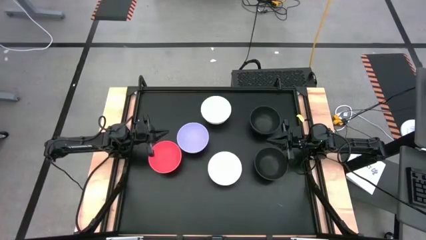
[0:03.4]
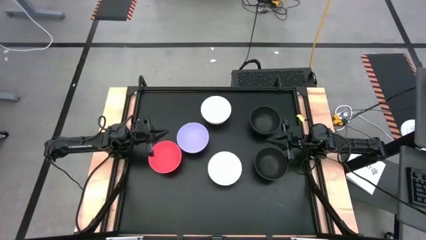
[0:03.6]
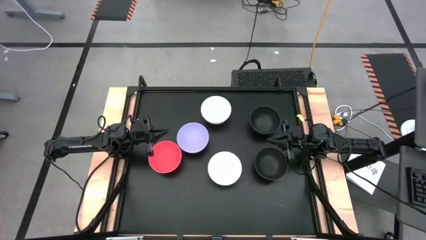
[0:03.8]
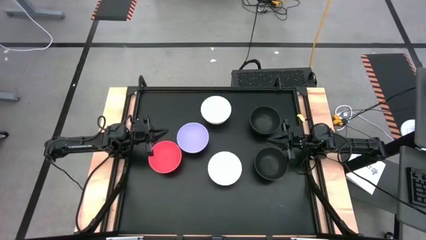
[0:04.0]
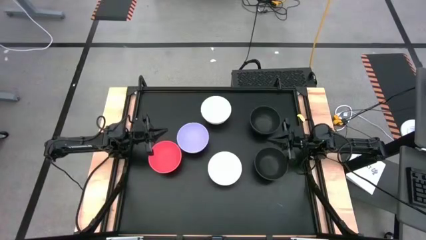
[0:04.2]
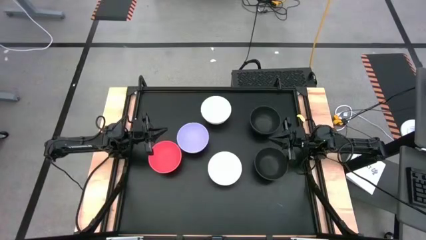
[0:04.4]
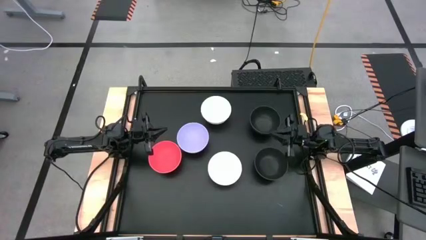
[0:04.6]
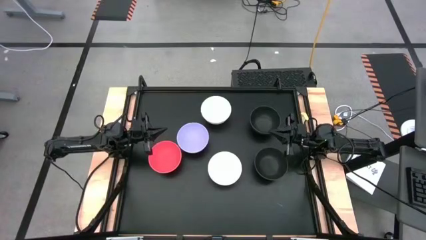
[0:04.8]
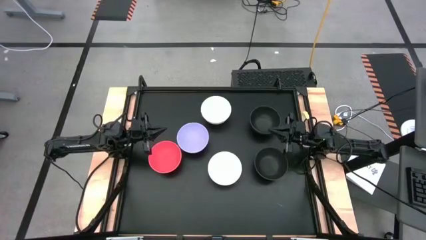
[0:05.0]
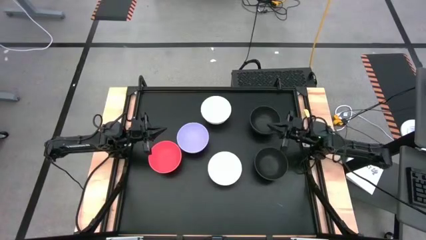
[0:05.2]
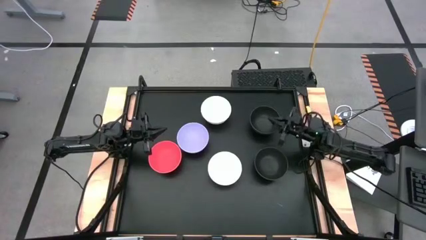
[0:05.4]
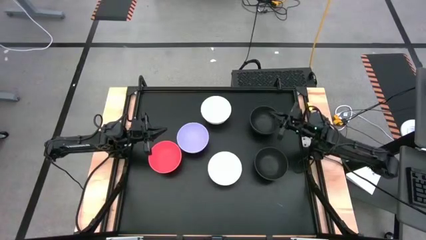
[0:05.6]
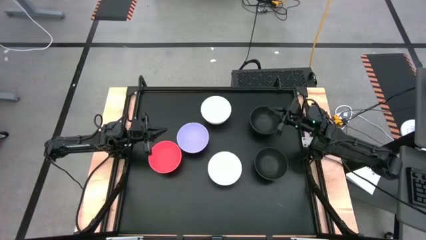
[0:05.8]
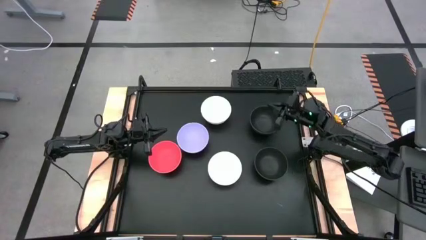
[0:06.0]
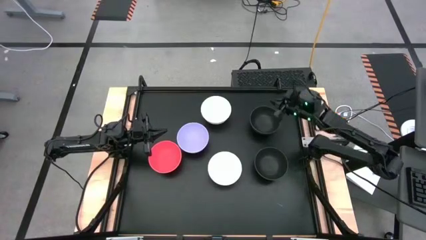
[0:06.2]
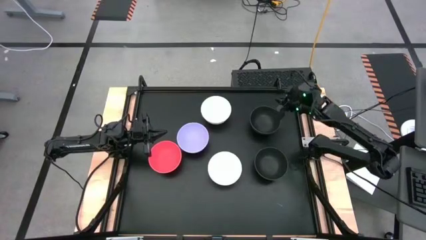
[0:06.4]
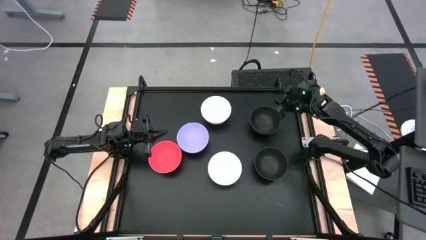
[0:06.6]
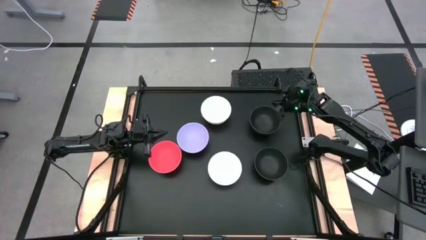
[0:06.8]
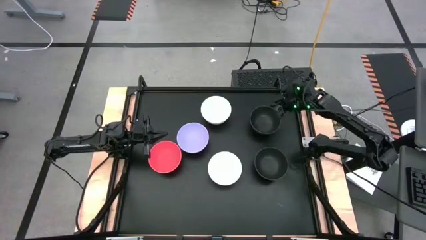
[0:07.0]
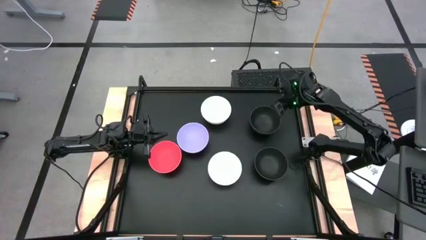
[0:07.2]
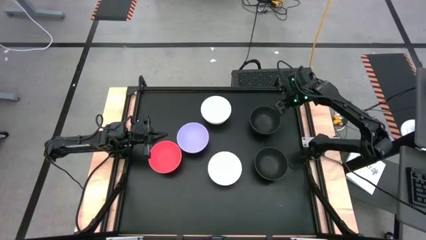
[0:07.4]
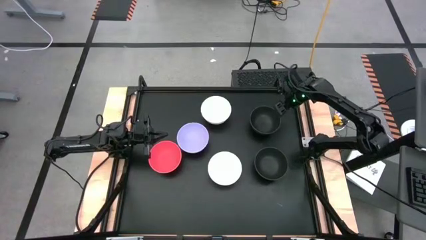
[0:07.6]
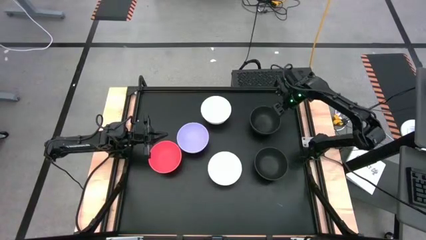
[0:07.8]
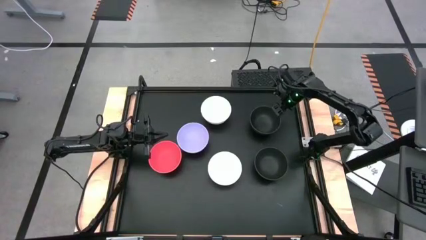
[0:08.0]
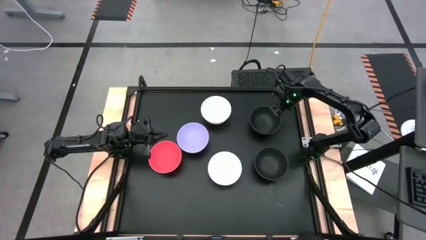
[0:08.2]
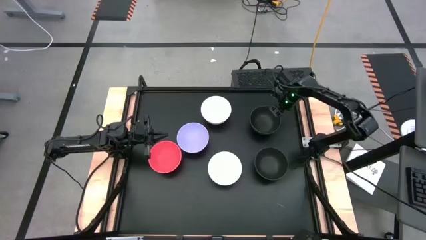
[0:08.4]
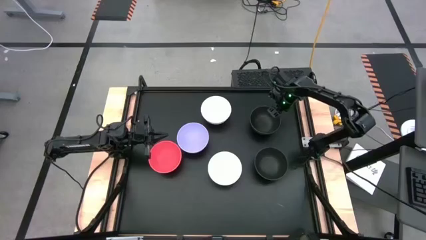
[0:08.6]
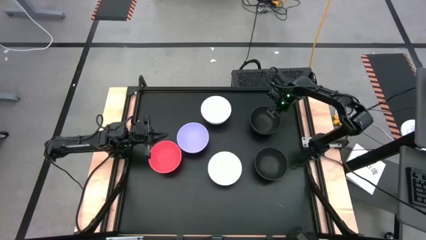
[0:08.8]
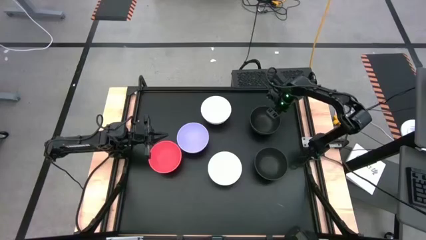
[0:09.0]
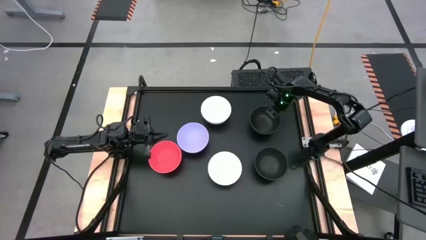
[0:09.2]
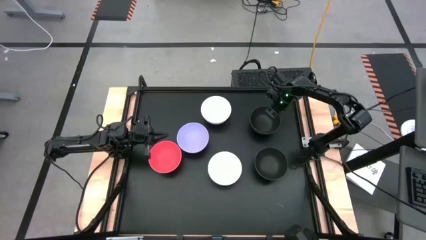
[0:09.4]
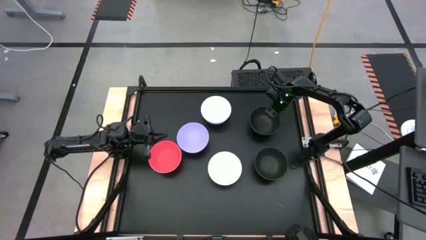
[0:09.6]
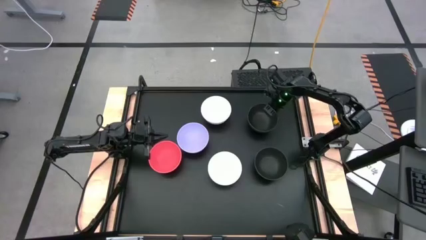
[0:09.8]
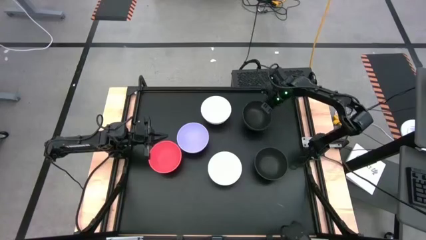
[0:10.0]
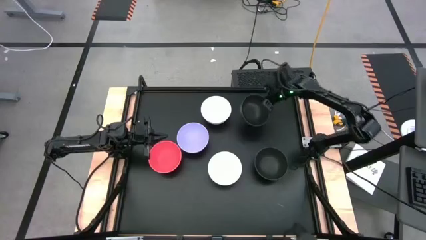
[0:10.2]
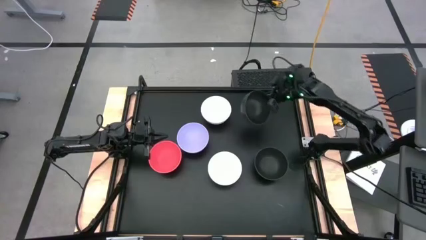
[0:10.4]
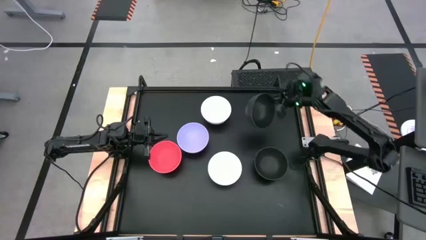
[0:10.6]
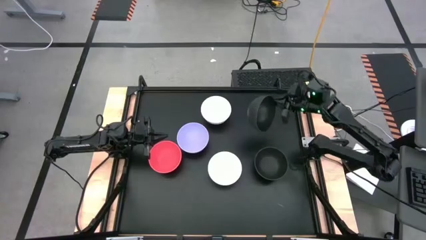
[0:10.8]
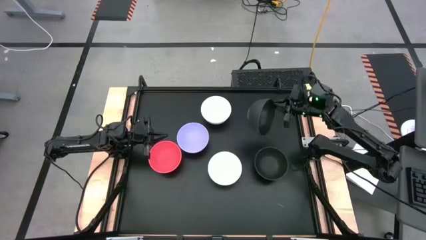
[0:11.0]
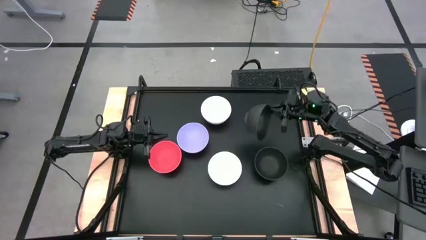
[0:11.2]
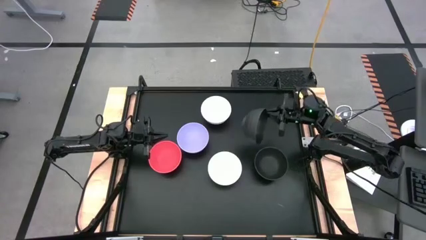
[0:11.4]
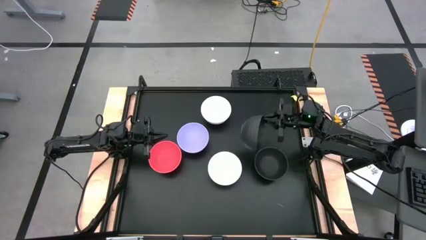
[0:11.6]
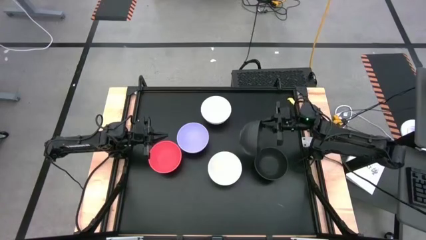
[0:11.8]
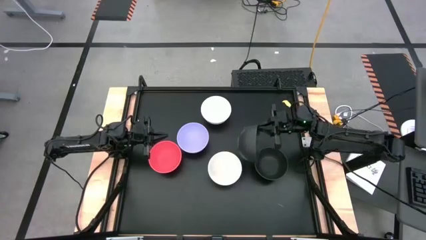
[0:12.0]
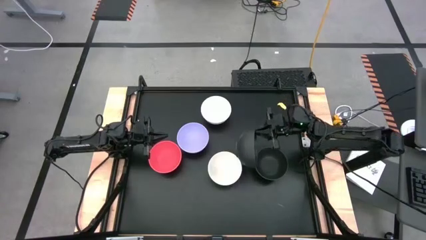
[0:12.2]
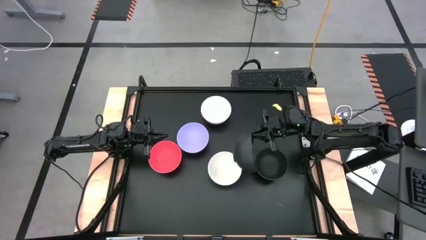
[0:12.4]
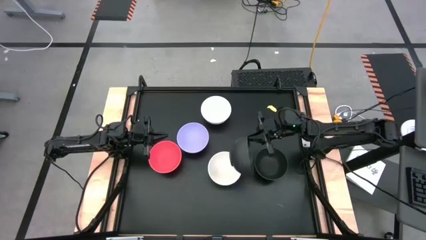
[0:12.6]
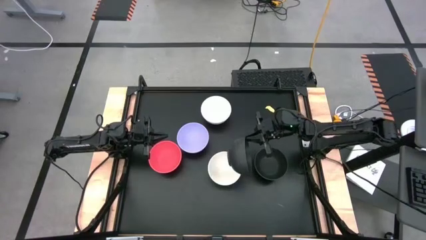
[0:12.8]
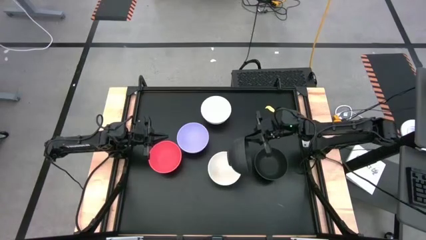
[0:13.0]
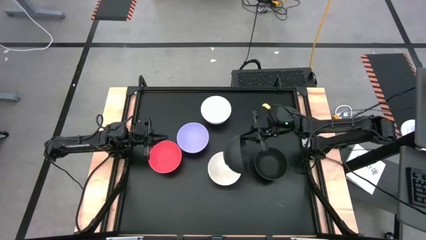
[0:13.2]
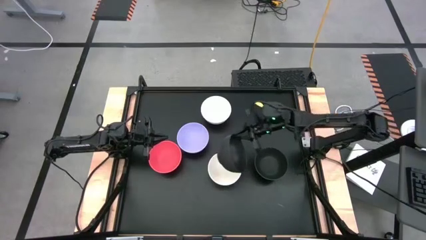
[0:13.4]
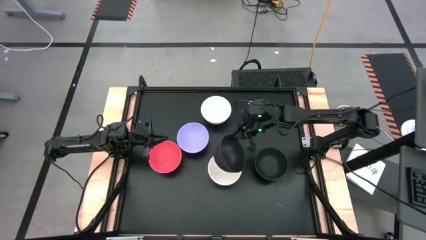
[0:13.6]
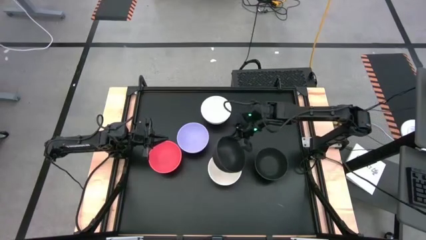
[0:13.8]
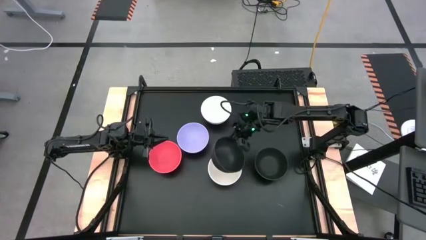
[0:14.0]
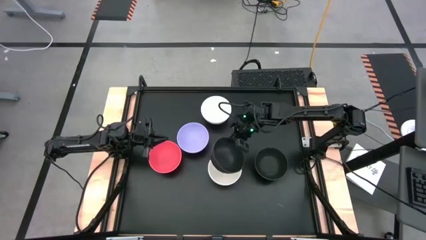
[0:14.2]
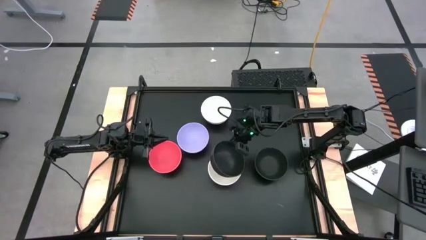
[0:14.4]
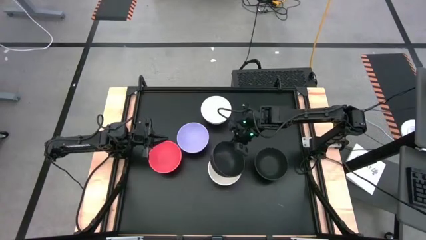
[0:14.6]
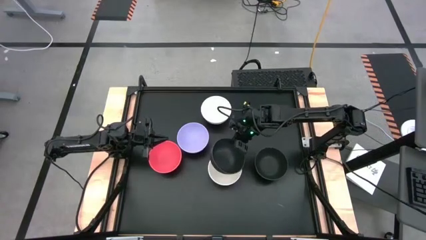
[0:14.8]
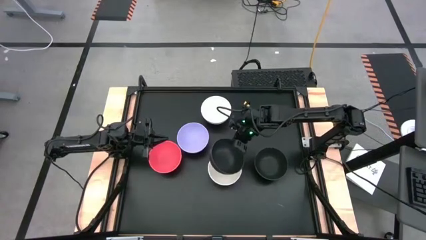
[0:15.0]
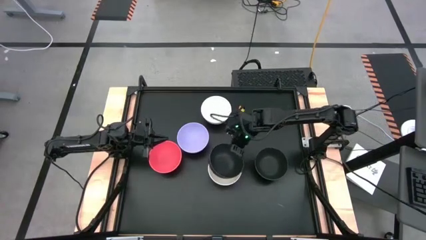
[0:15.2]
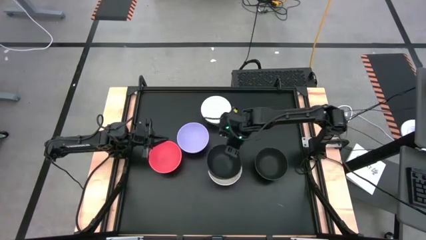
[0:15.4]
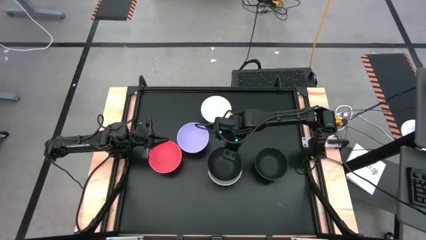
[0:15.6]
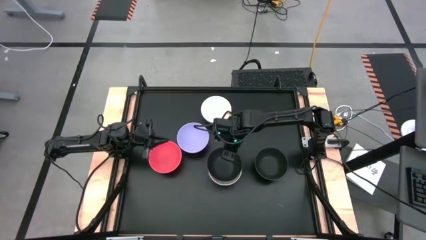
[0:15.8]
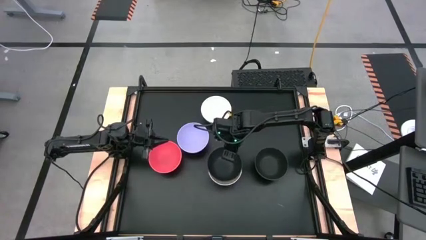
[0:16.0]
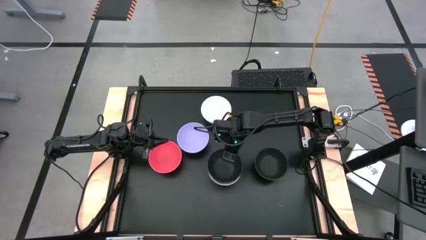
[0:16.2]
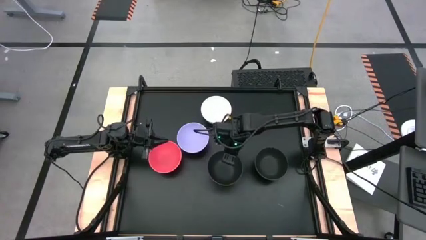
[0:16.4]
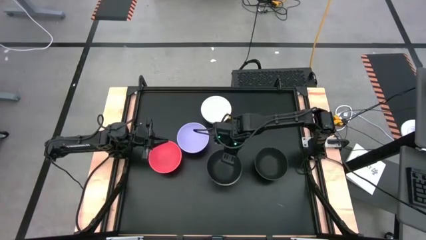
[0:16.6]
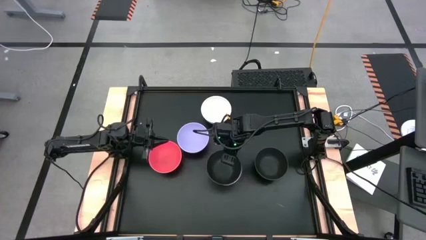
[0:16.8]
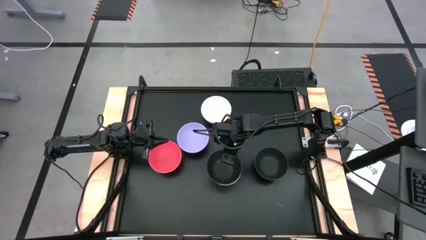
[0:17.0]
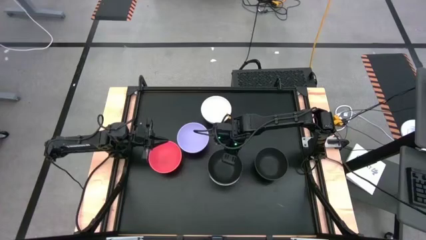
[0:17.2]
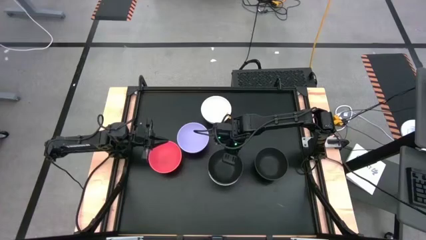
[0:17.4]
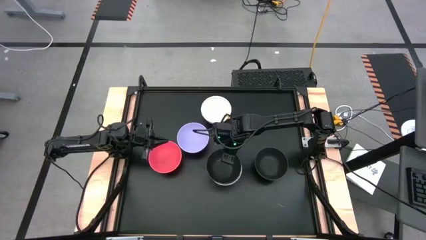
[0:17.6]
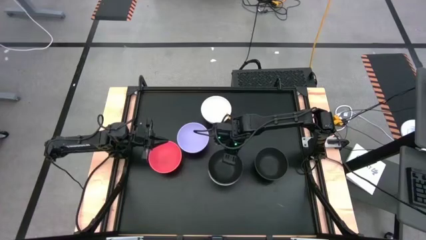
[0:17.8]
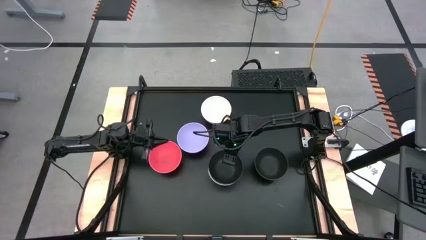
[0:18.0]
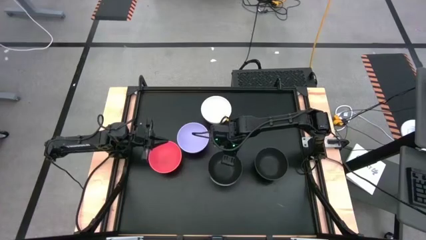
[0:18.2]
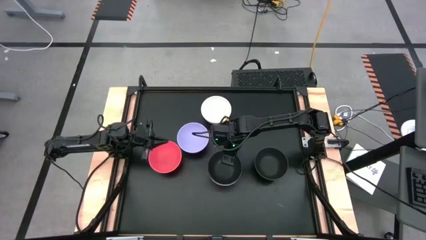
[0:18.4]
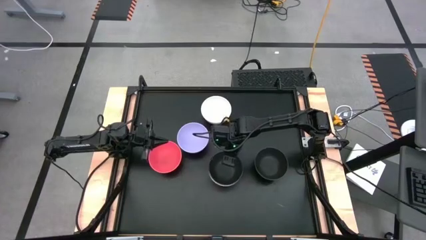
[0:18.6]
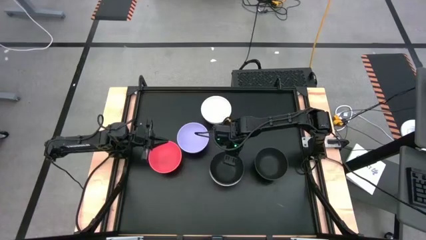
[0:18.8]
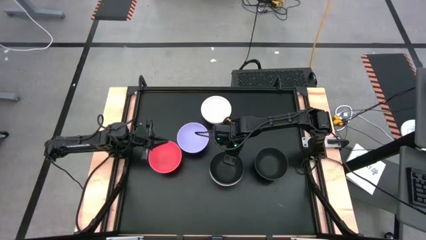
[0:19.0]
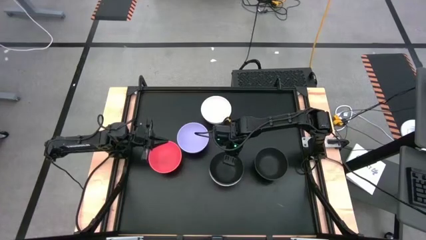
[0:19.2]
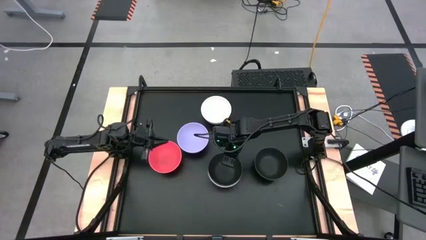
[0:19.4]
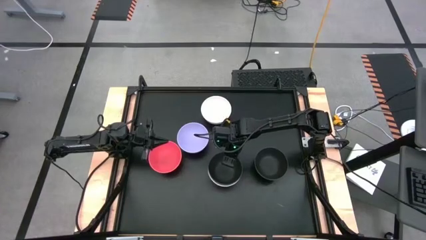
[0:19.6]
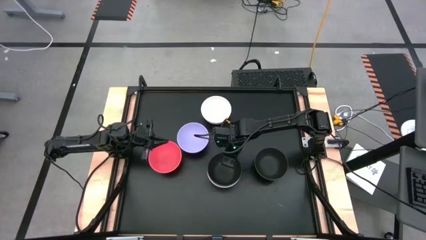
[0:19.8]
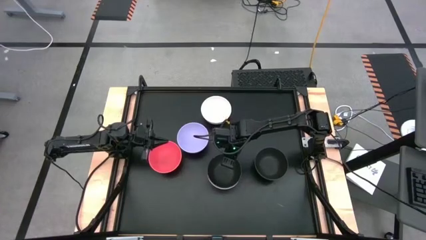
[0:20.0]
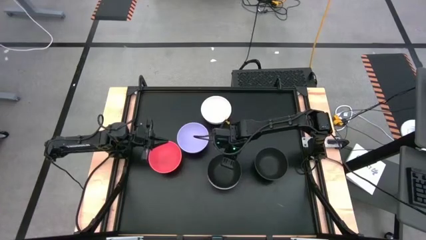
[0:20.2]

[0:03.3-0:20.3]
Task: Nest bowls inside each other
Stack the top black bowl on top of the white bowl
